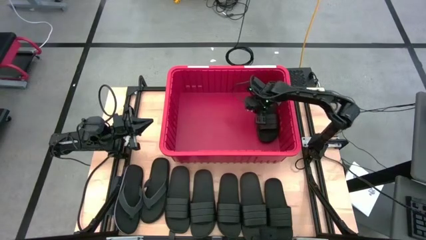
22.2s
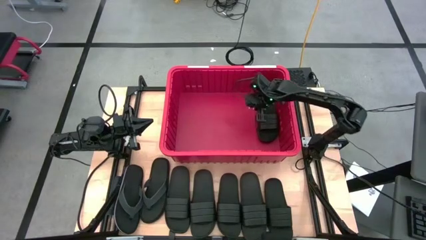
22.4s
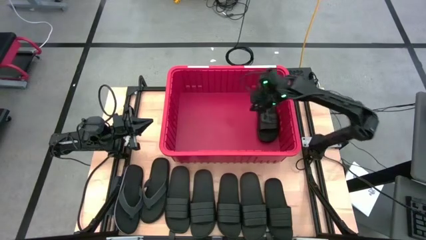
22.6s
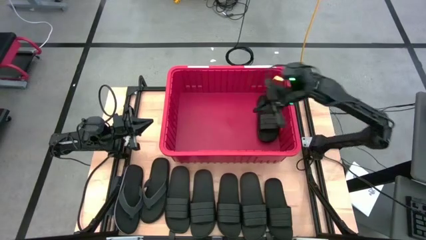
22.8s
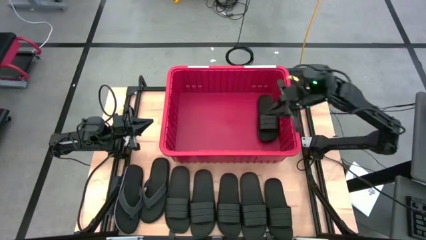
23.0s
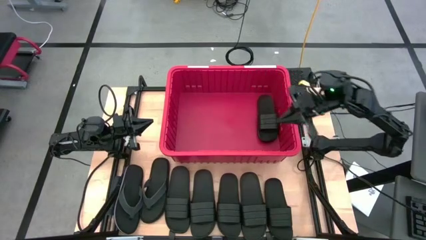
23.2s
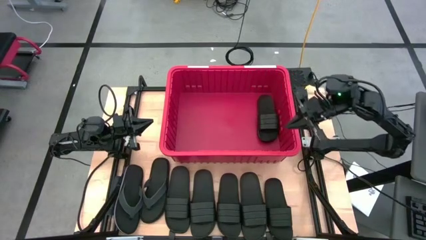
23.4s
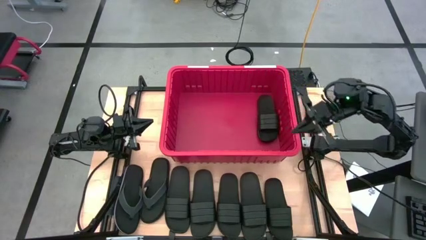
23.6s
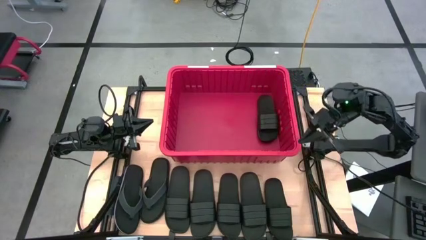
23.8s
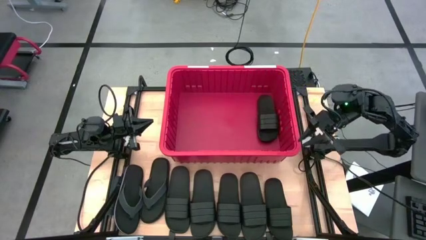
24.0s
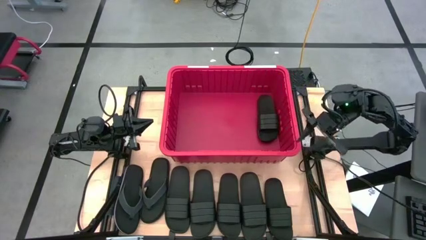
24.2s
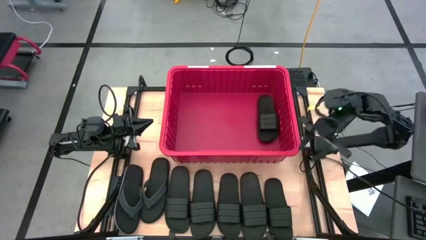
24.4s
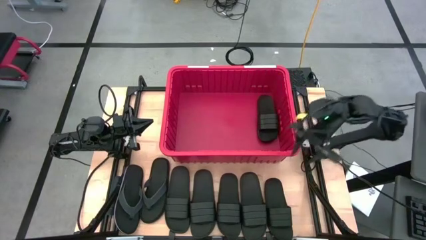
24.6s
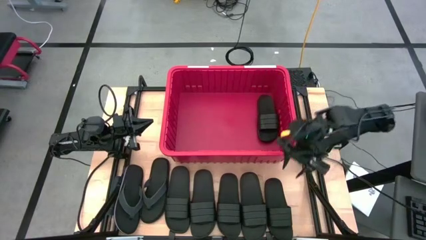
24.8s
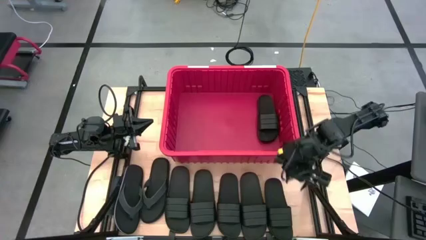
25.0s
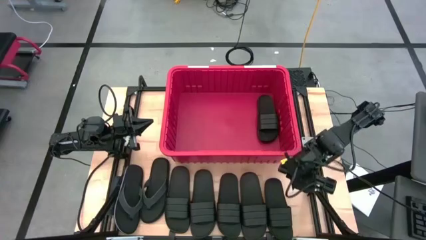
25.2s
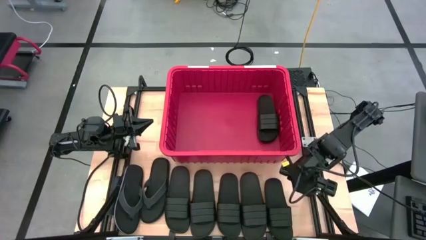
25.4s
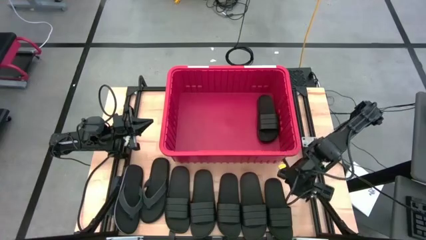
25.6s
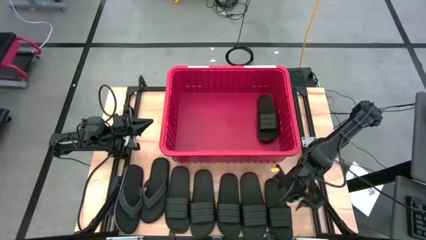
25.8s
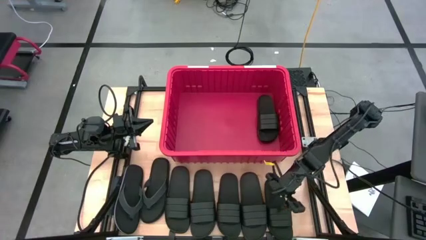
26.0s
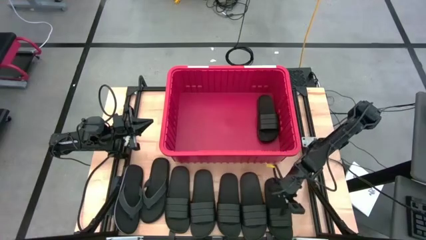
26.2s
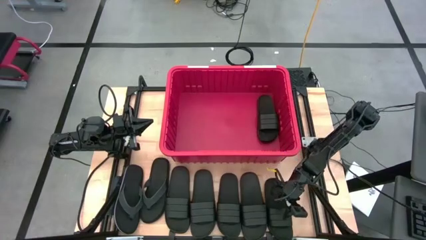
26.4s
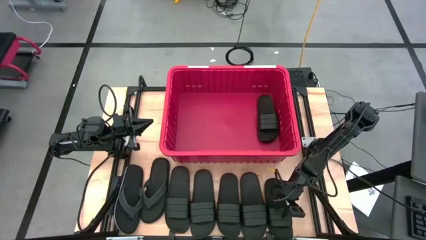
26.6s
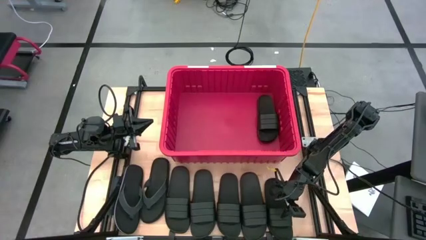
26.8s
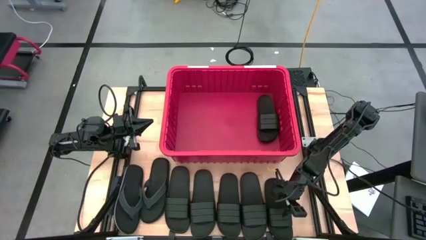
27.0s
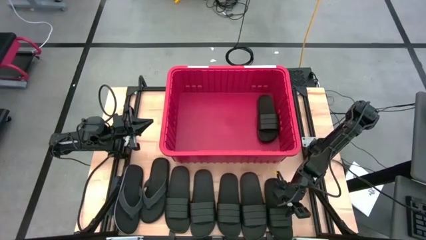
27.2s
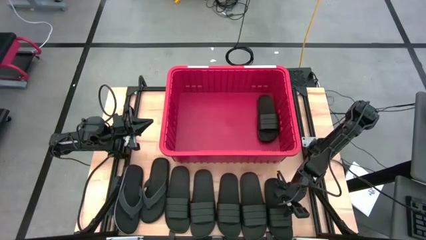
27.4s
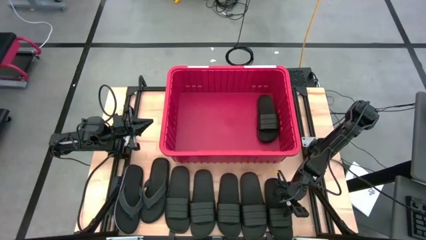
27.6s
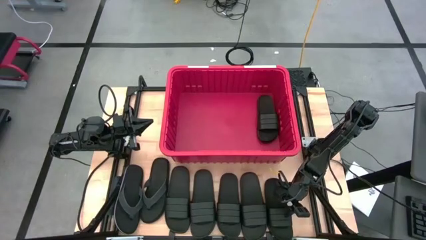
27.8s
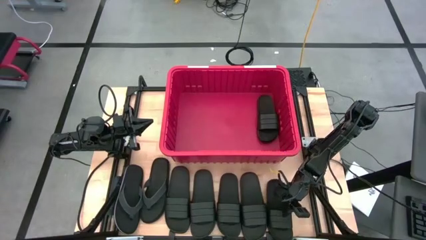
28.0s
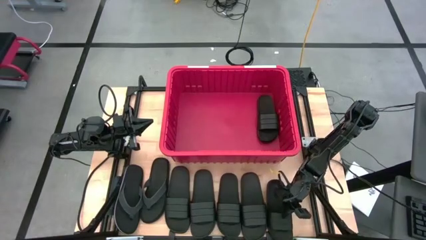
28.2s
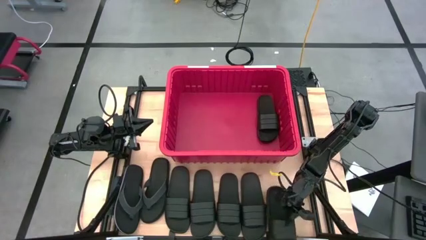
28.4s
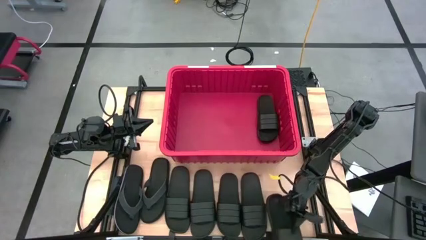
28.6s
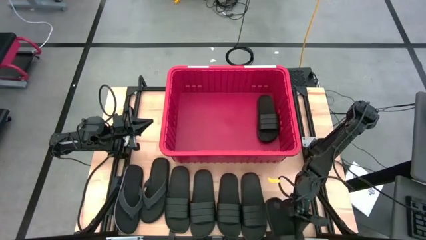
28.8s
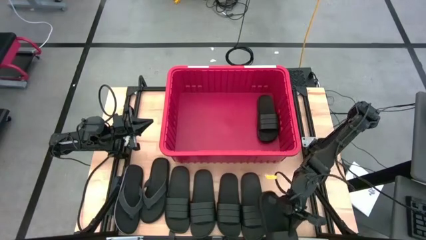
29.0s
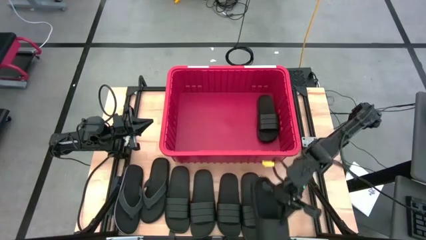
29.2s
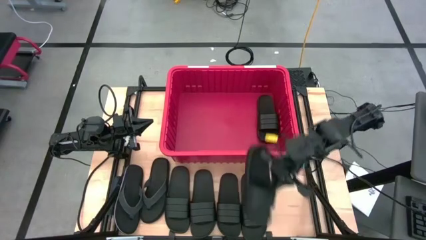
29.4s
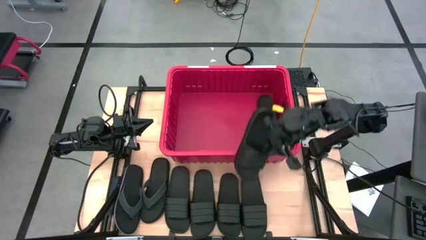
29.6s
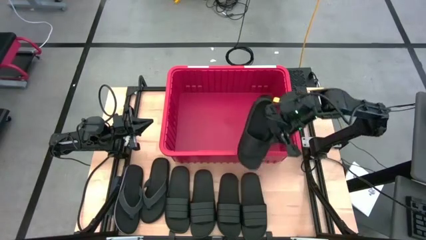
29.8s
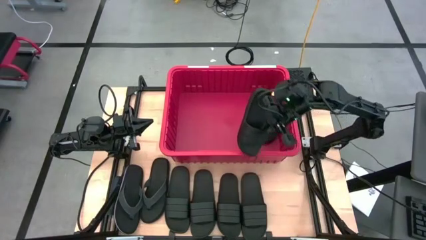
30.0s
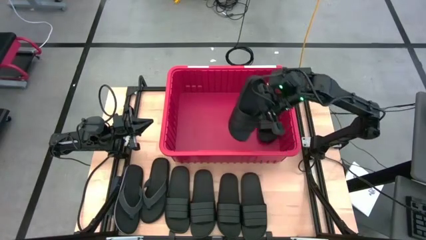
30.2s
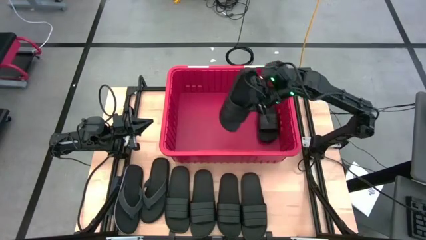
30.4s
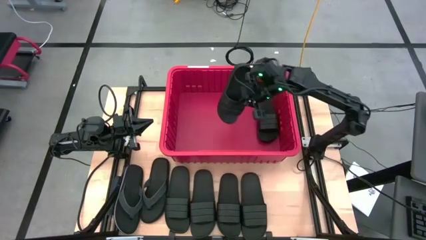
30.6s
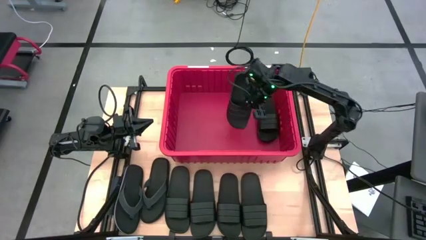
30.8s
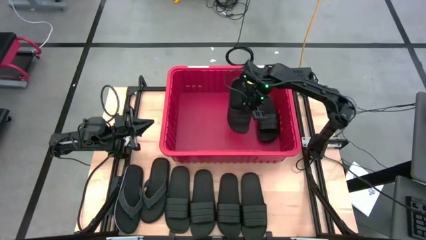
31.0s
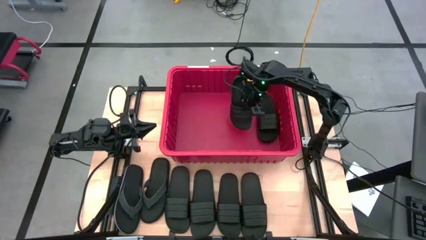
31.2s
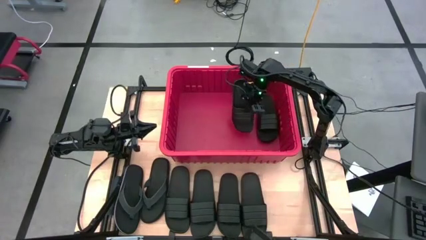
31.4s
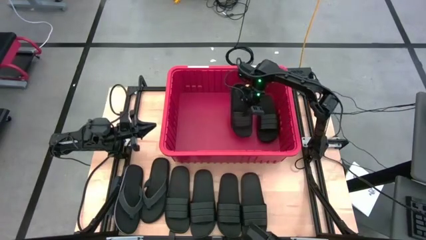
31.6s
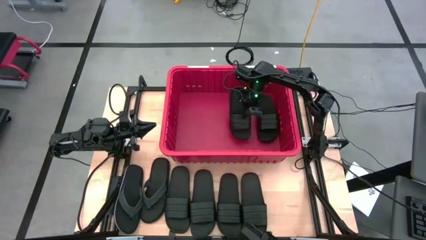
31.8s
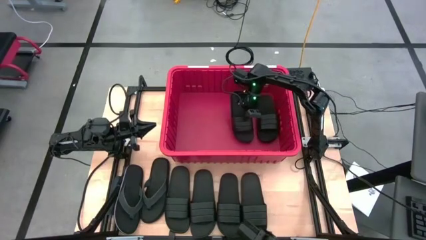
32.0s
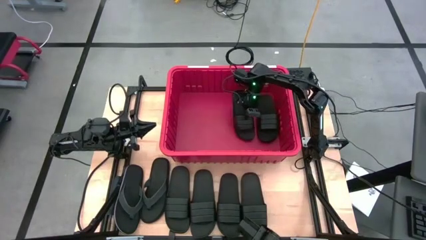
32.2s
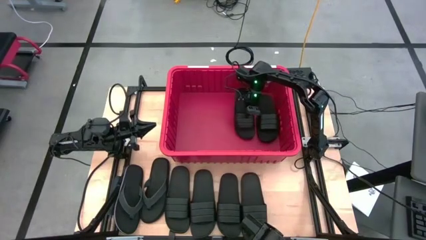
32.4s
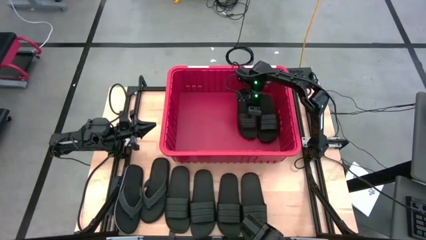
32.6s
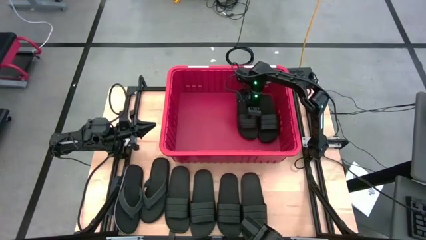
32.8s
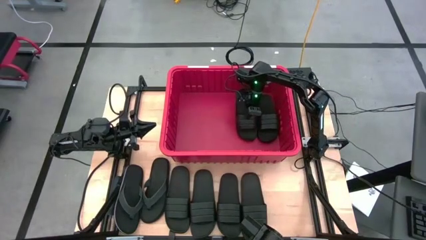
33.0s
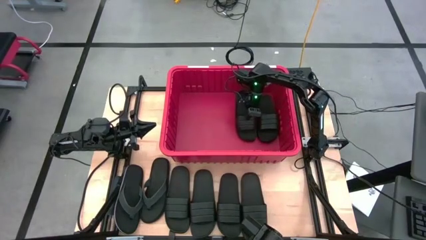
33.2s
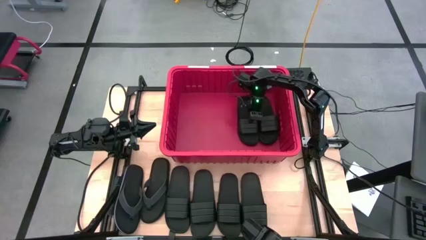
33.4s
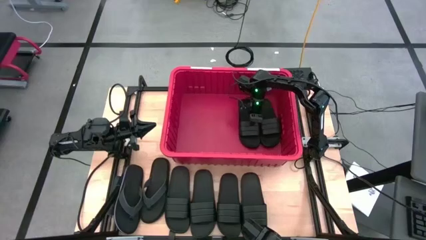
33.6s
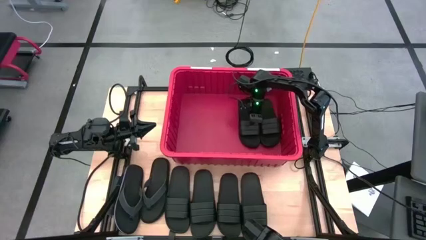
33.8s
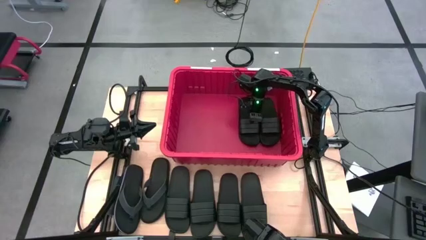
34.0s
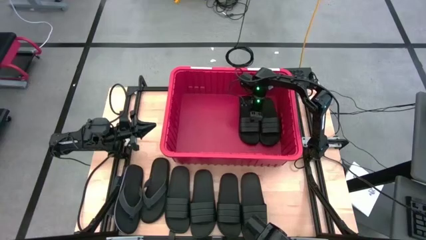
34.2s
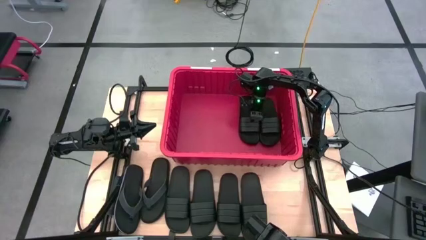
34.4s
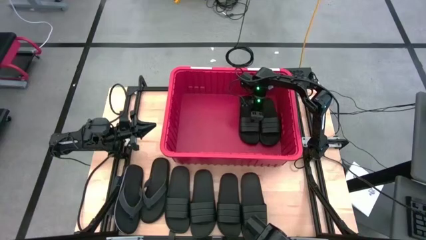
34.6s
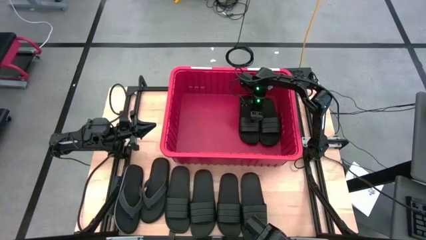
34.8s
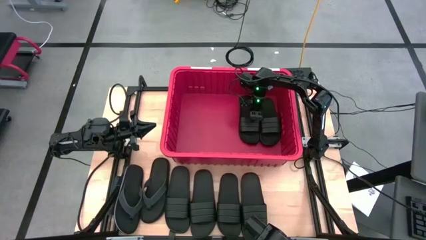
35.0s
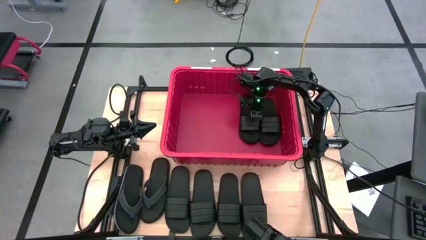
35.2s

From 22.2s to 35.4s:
Task: Pick and place slides into bin
Put the black slide into the red container

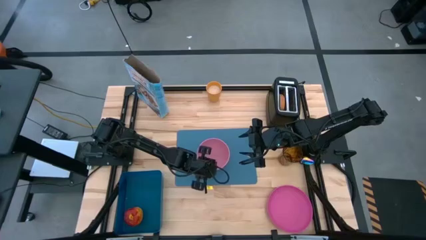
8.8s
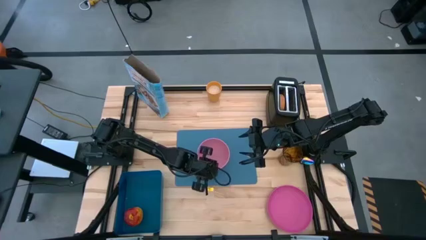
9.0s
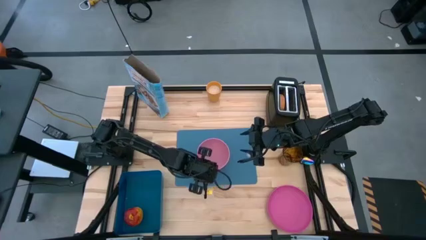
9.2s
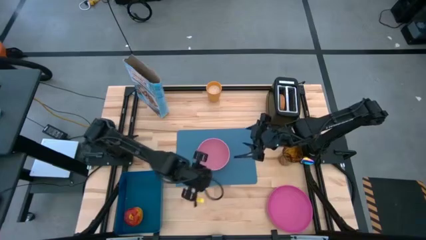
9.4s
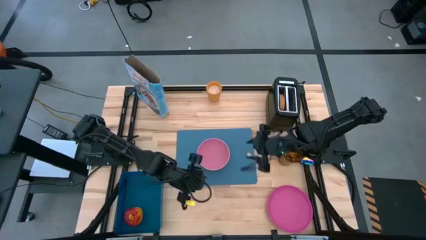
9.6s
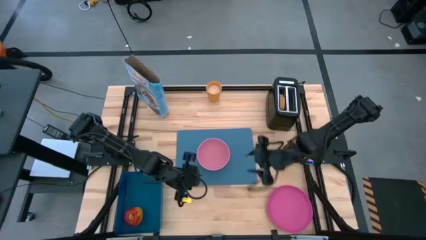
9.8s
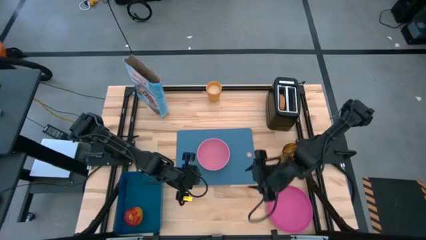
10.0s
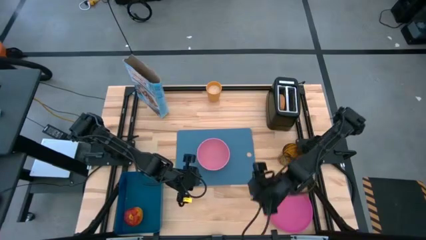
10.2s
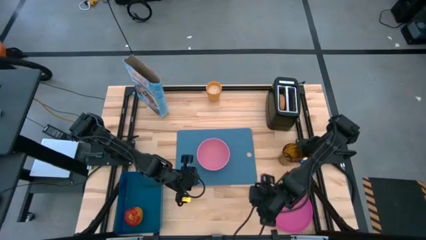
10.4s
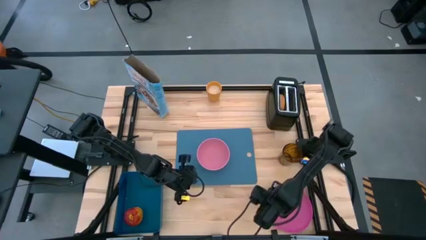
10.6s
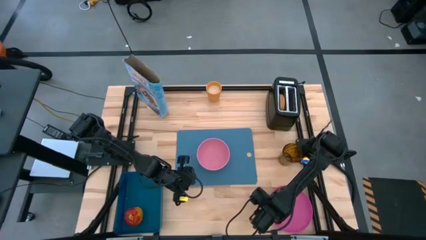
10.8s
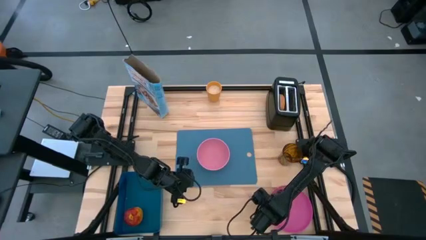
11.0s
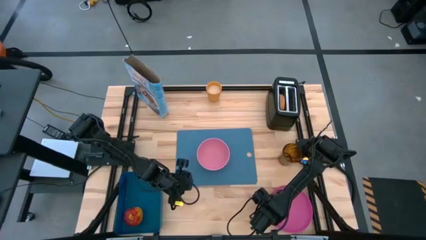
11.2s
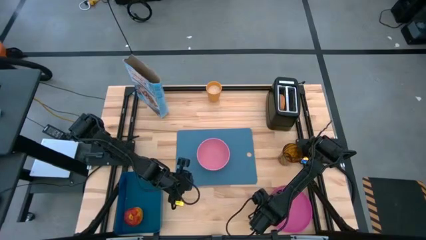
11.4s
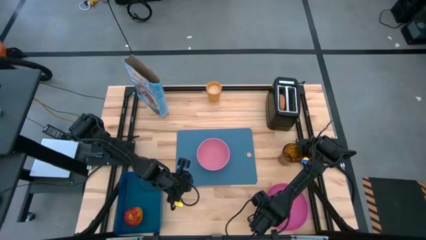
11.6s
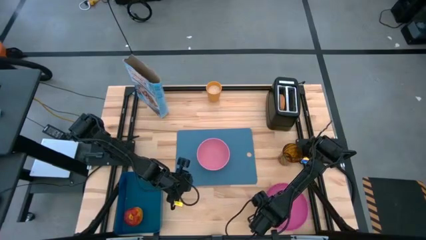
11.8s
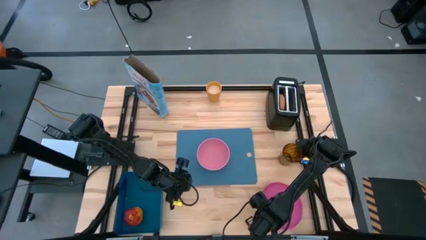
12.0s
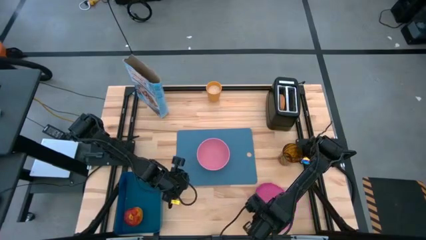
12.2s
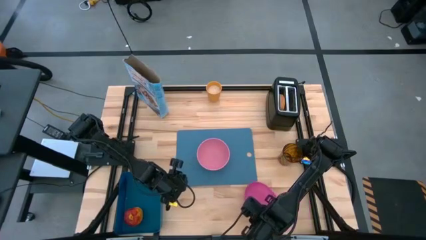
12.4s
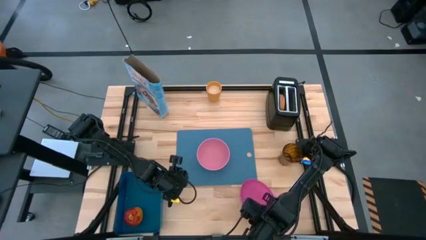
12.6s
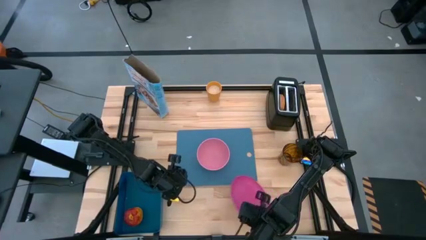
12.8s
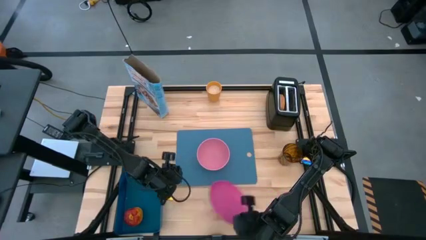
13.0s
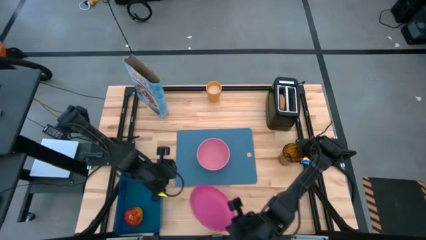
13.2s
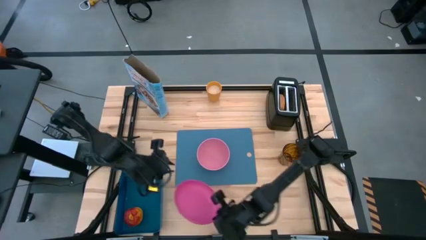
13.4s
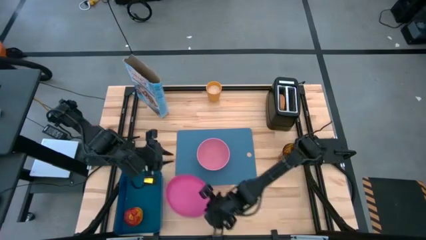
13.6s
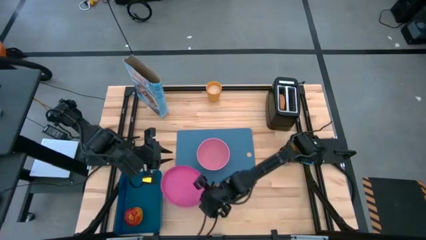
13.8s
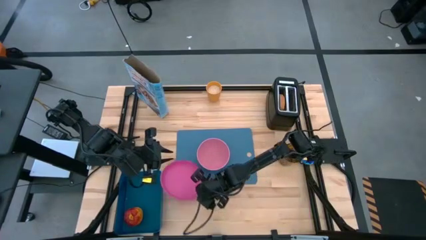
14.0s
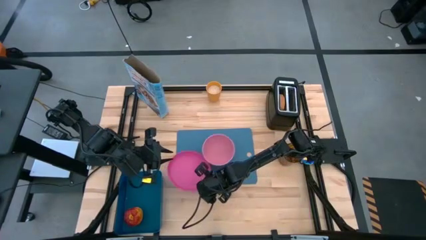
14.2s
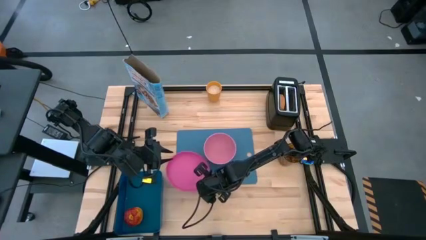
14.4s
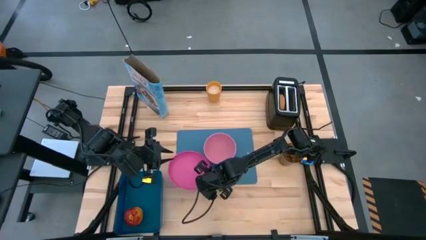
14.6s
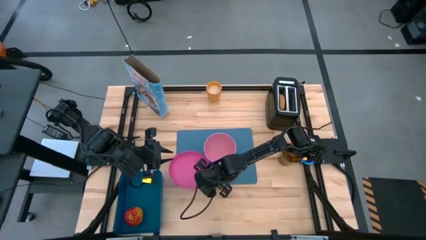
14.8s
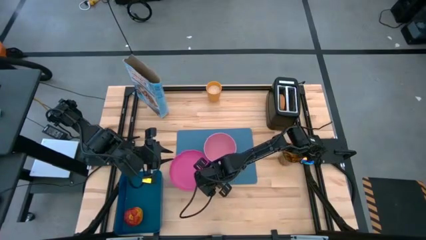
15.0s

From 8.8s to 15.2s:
Task: Arrange a breakfast setting
Put the pink plate on the blue tablemat to the bottom left of the pink bowl
